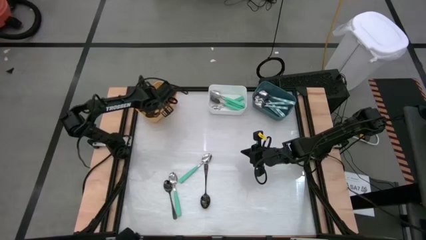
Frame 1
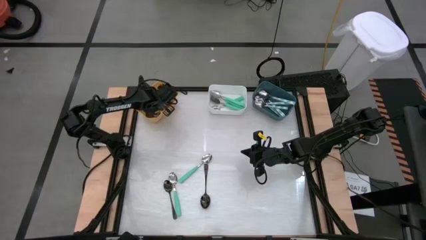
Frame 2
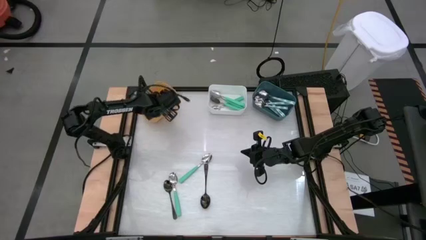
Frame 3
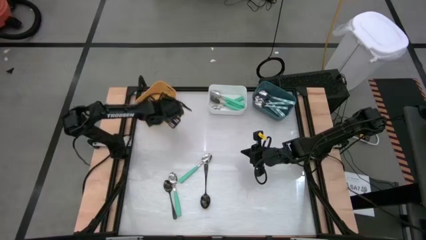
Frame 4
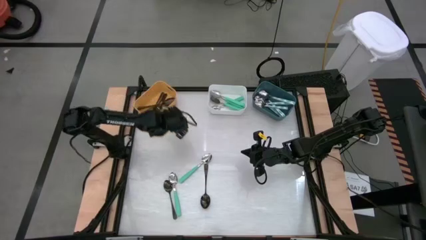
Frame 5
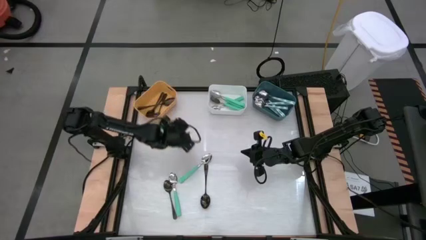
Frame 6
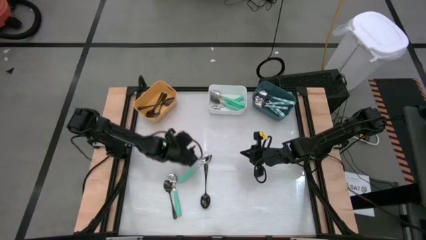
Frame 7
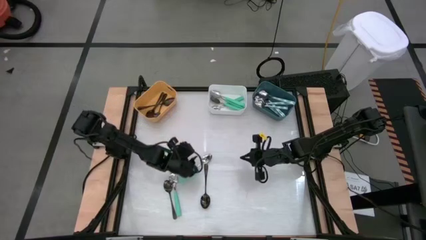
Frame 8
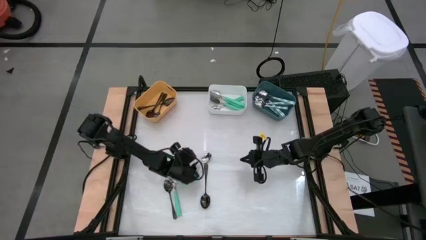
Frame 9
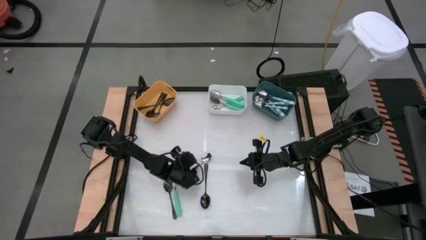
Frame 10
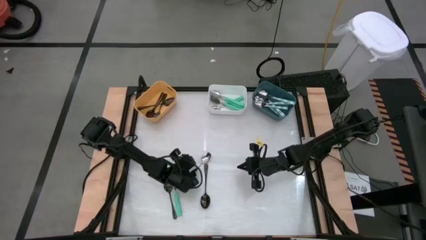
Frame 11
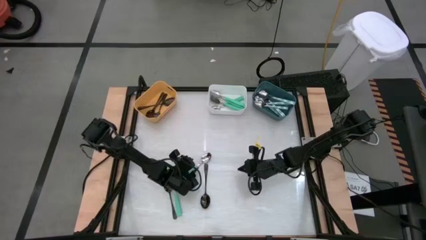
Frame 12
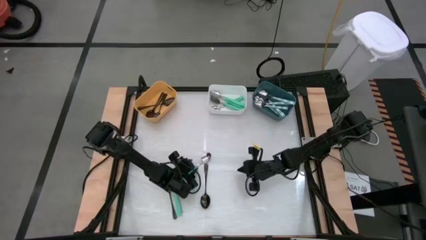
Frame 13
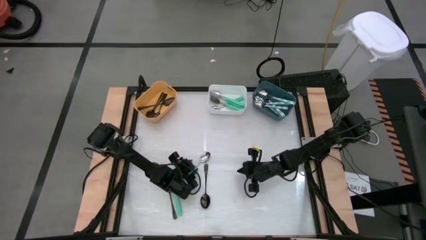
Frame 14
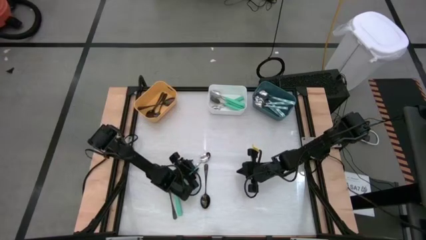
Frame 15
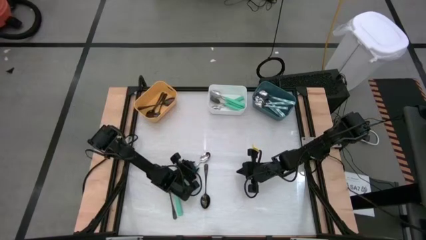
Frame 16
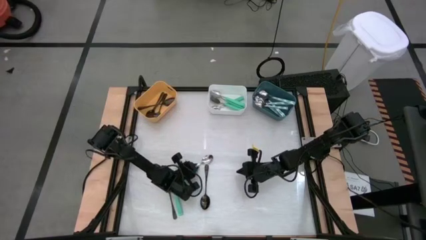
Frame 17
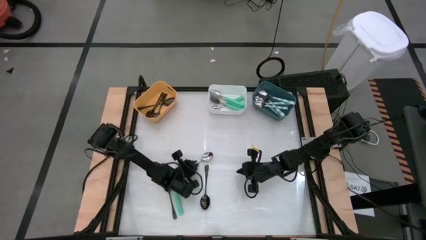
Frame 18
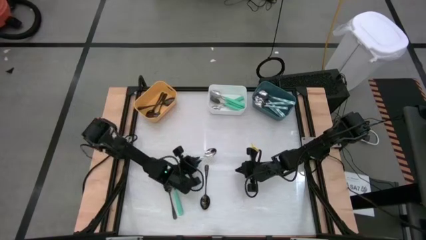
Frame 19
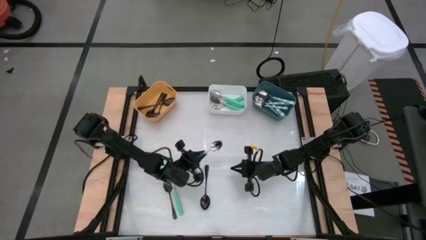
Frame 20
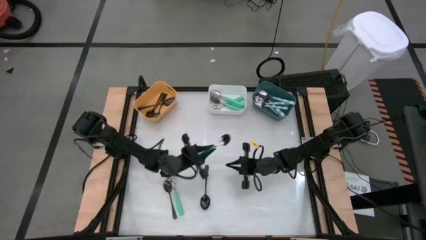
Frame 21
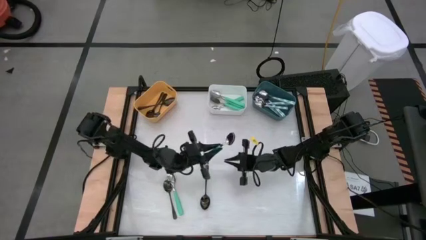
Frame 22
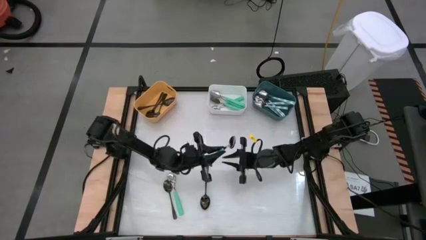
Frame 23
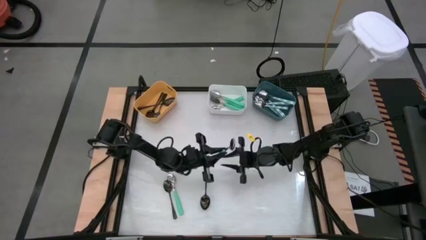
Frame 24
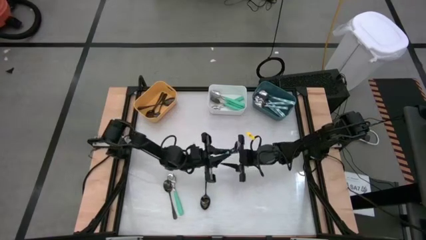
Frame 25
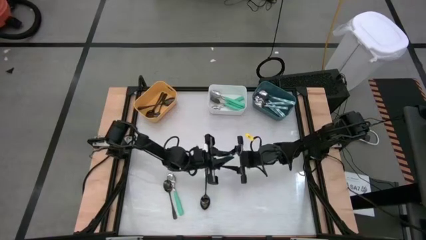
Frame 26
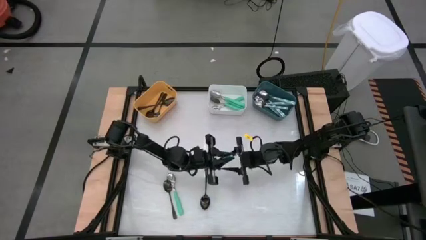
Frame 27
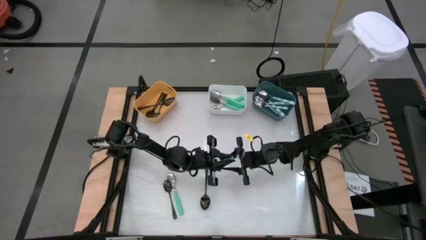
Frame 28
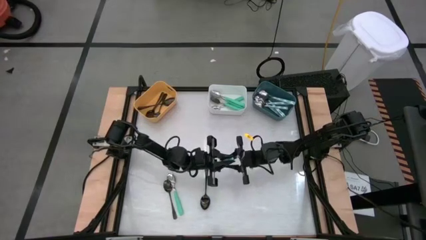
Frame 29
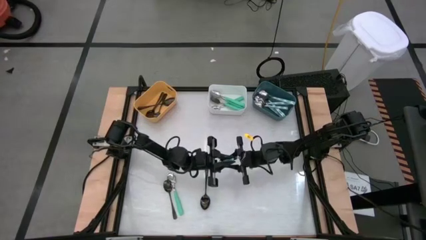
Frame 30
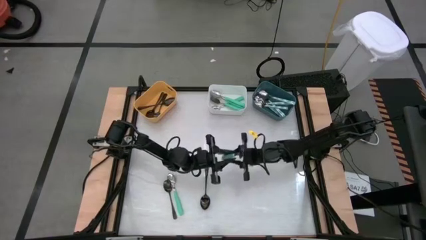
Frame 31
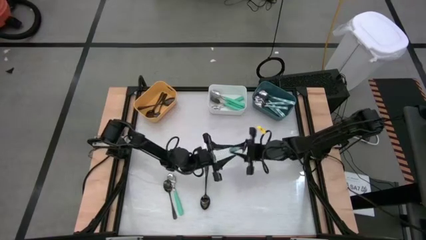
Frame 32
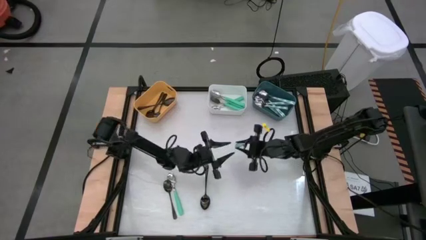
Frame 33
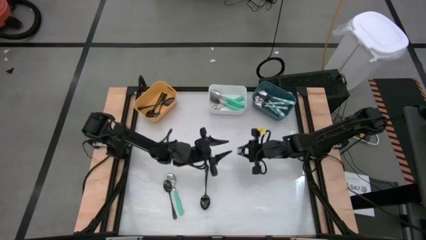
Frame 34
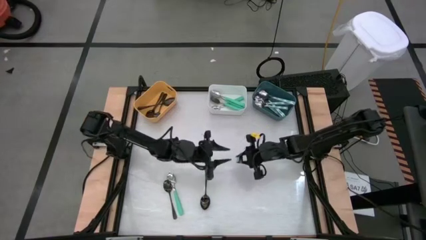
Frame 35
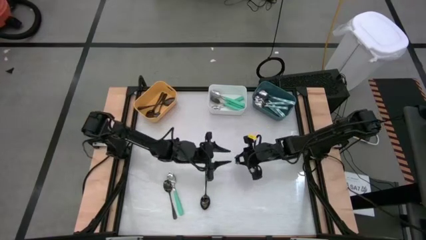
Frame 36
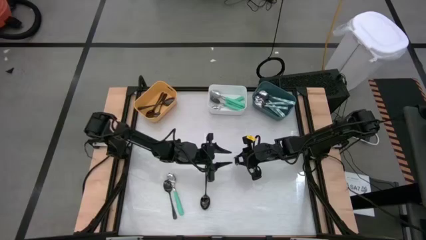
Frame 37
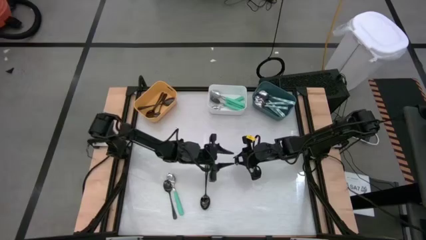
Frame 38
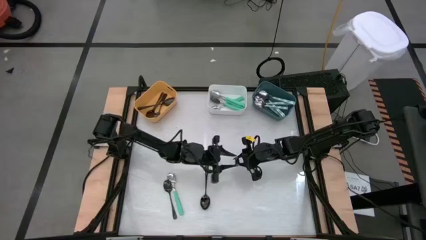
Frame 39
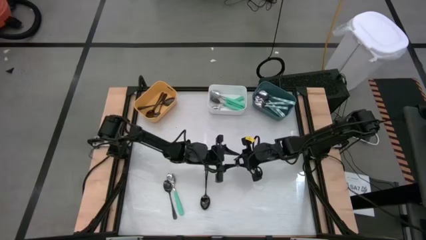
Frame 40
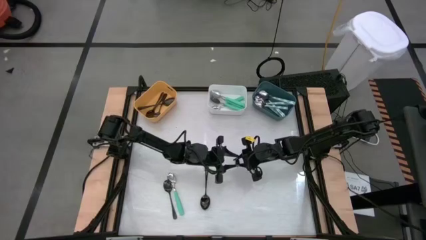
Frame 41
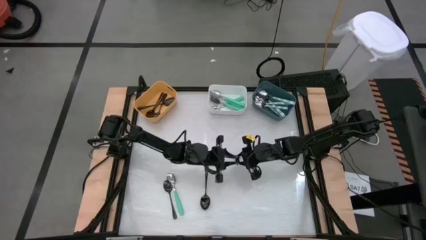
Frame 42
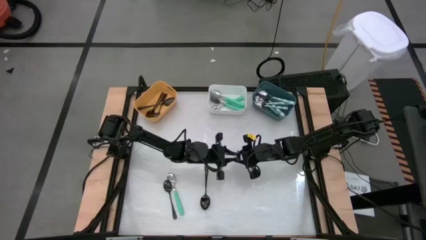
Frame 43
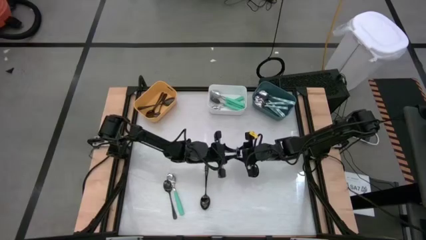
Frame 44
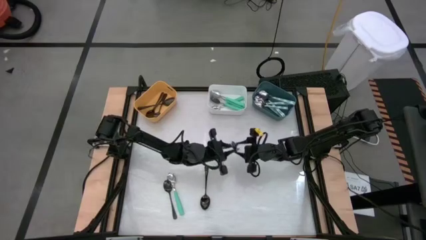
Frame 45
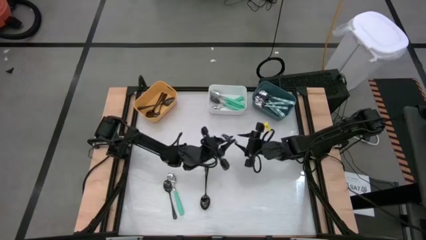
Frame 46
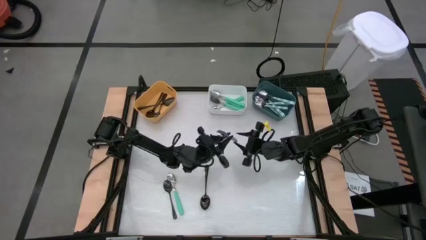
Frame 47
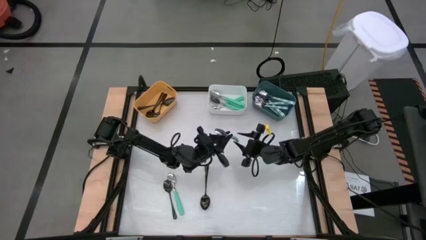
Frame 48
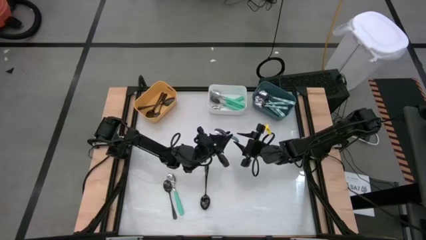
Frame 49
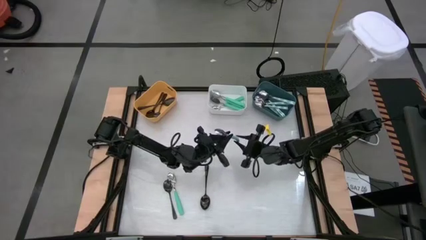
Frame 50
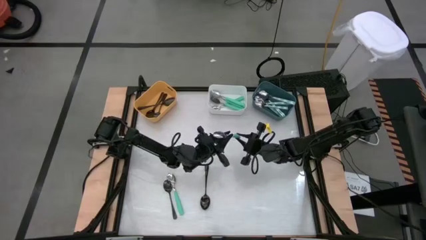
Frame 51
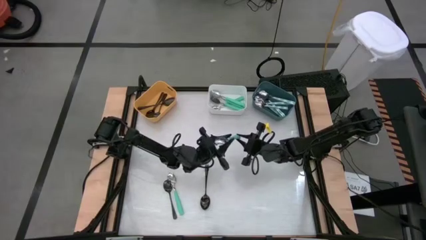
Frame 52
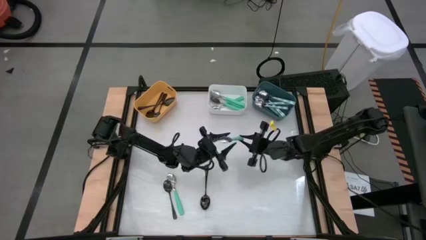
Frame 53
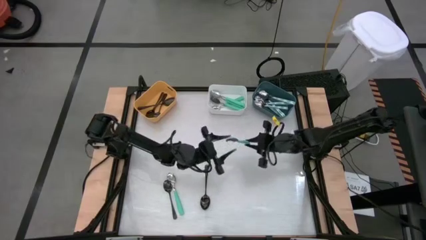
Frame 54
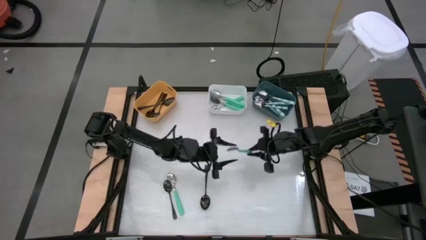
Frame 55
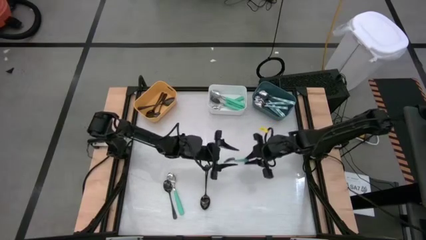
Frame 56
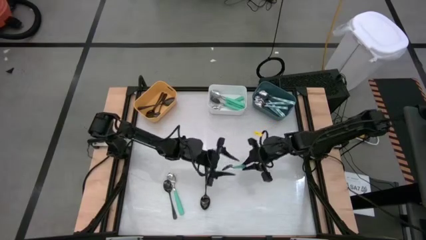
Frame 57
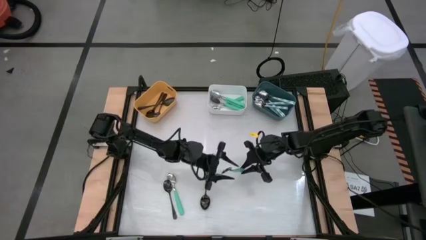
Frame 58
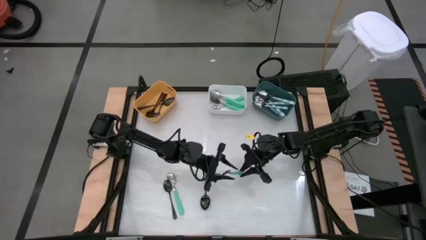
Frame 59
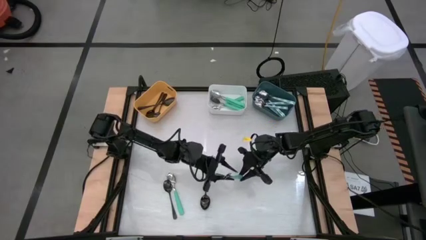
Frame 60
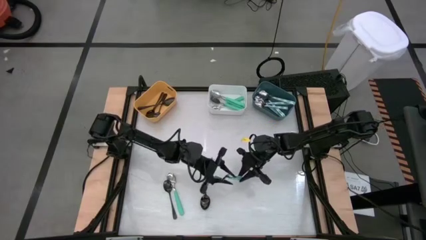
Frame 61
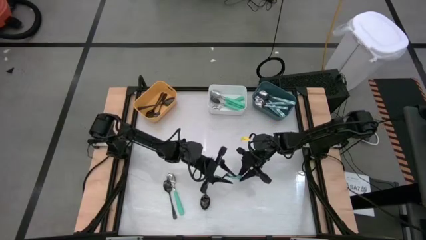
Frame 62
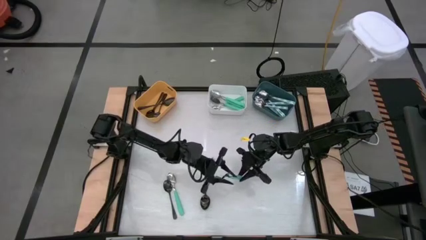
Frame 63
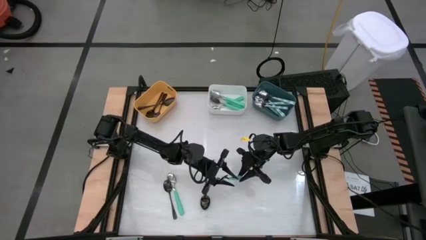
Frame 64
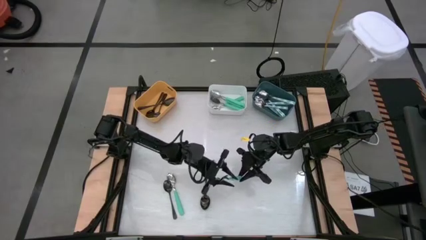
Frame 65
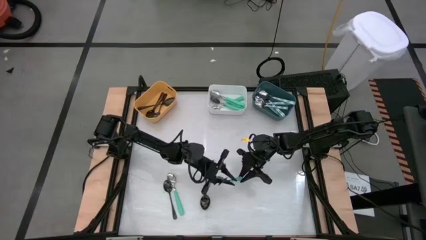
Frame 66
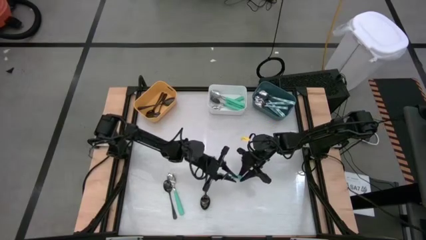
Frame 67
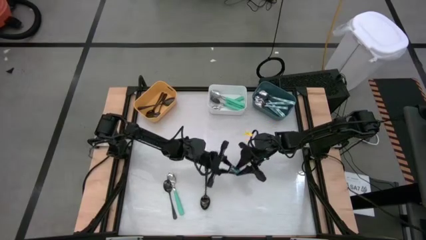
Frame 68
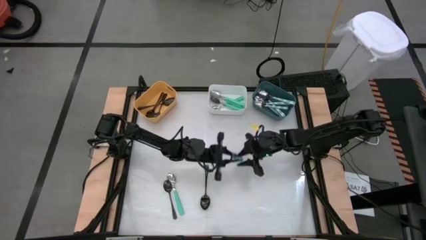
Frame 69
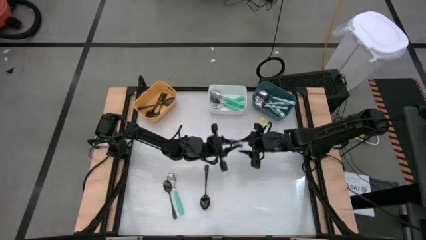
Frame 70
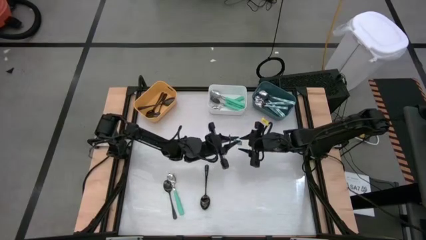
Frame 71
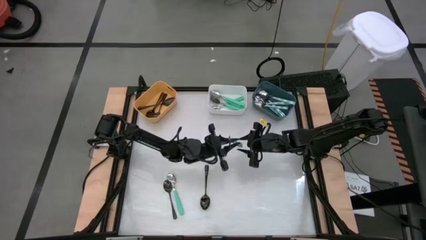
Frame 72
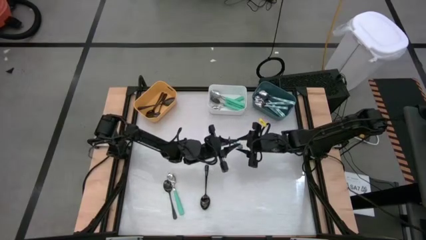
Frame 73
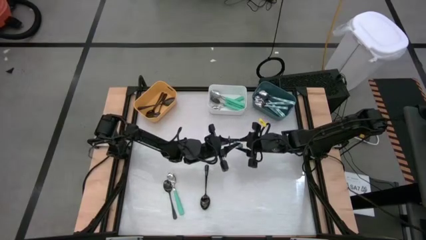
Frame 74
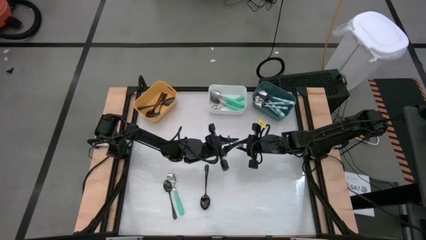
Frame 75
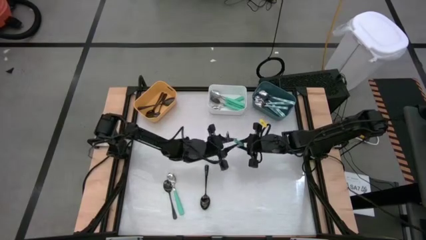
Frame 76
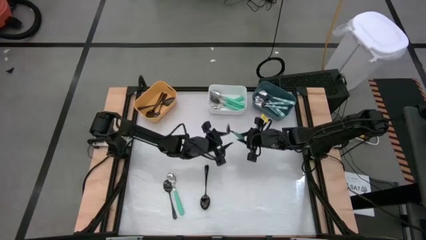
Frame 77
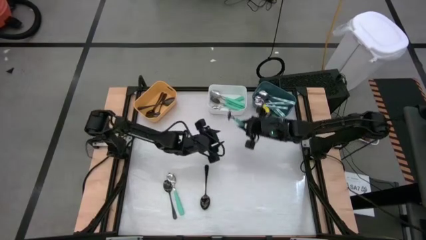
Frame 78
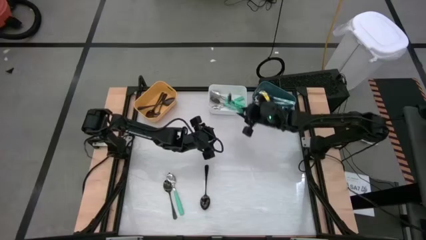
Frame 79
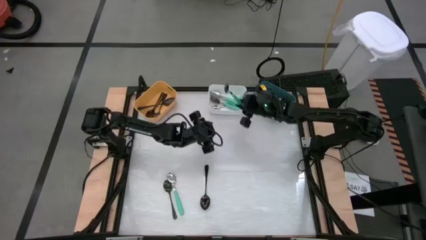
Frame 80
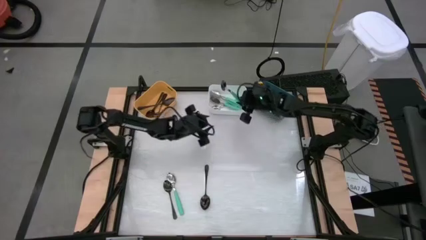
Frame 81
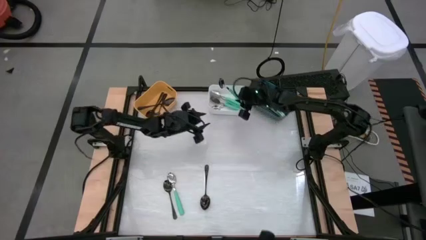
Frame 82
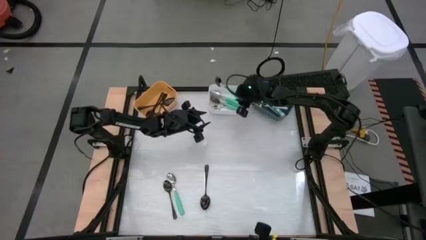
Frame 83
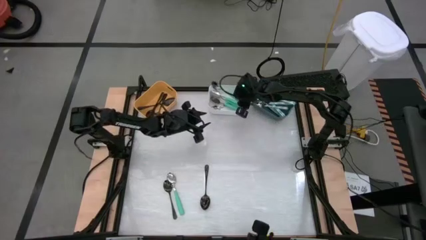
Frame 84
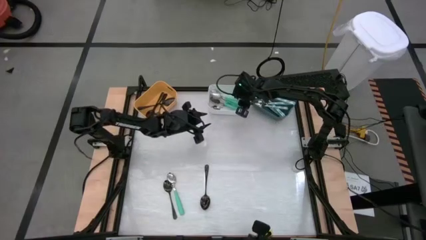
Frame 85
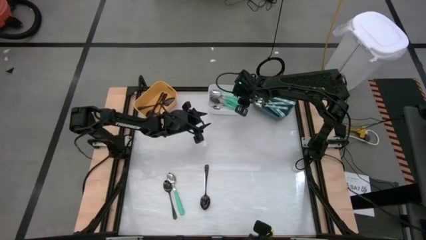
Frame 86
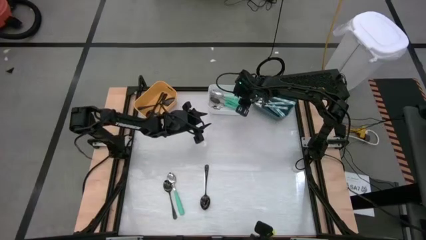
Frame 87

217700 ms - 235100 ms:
Task: Sort silverware by color (type)
Put the blue spoon into the white bin
